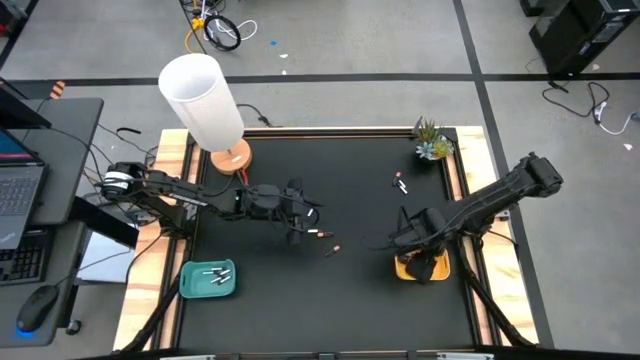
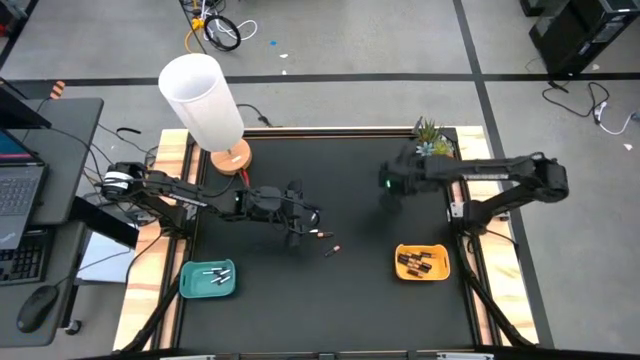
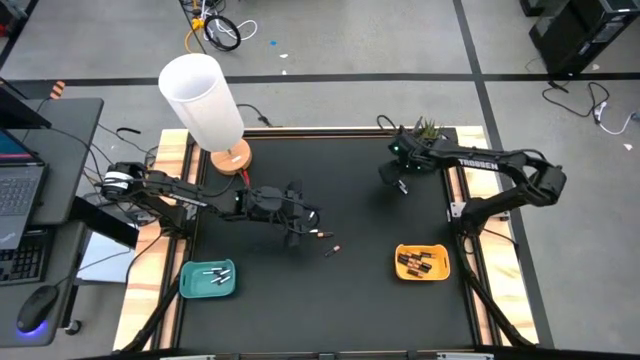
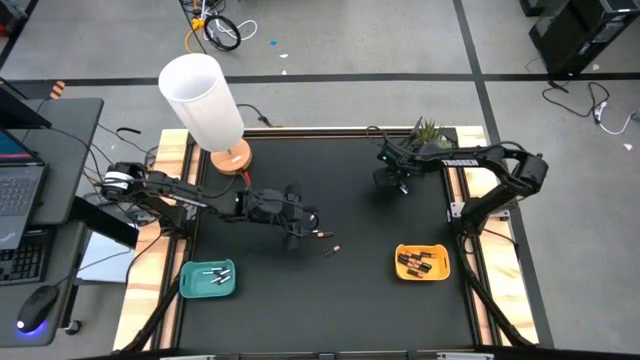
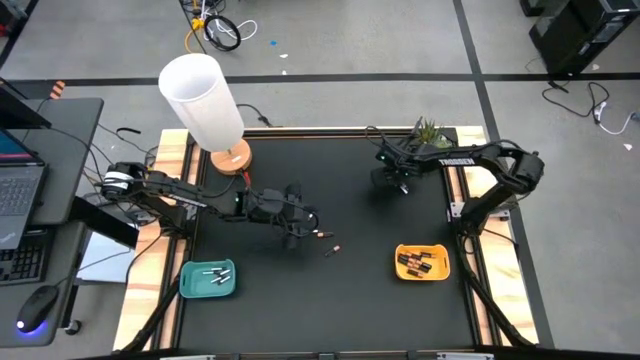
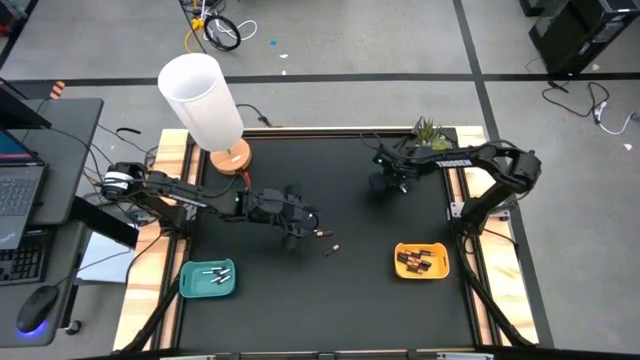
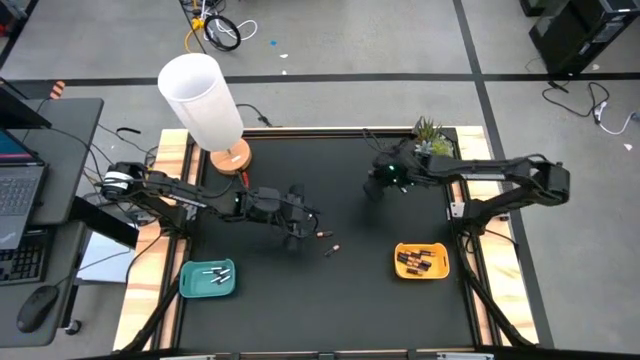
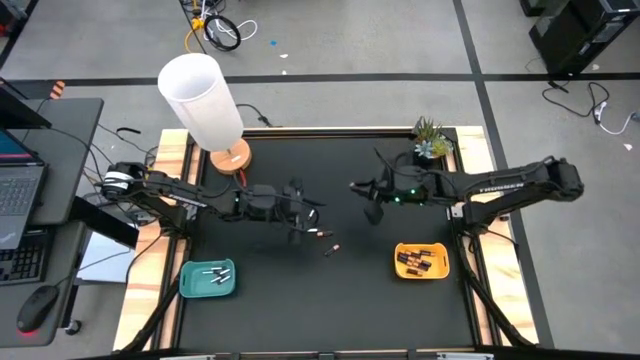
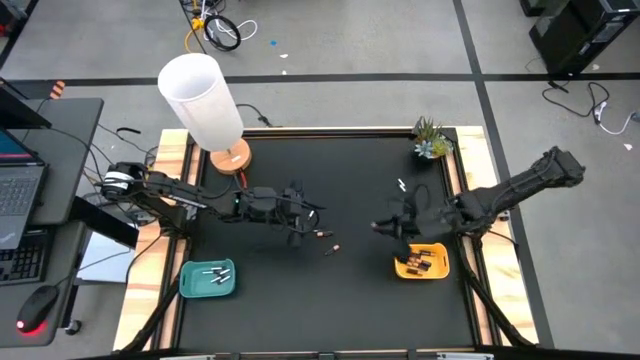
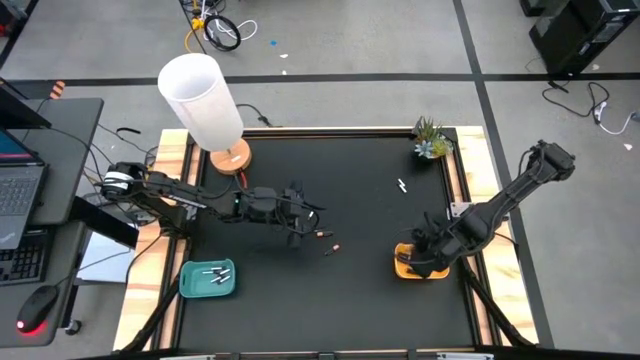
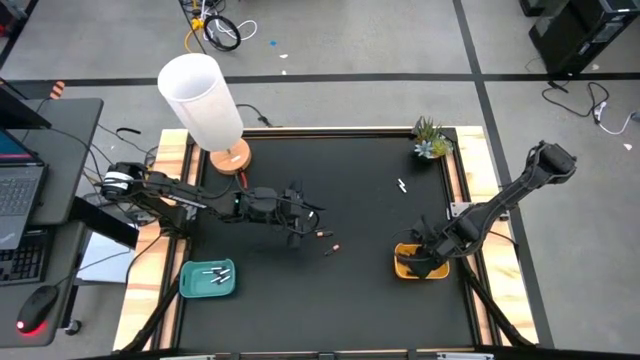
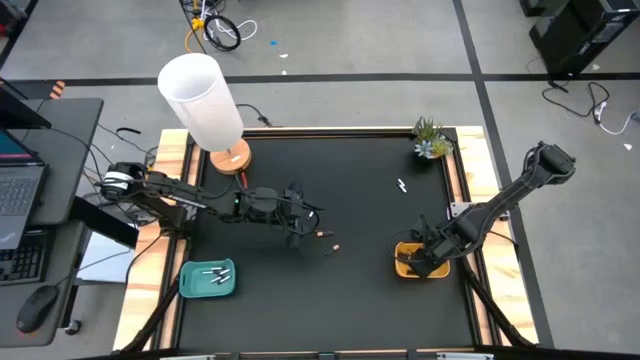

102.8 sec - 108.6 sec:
Task: Sort batteries
Put the black battery into the yellow bin

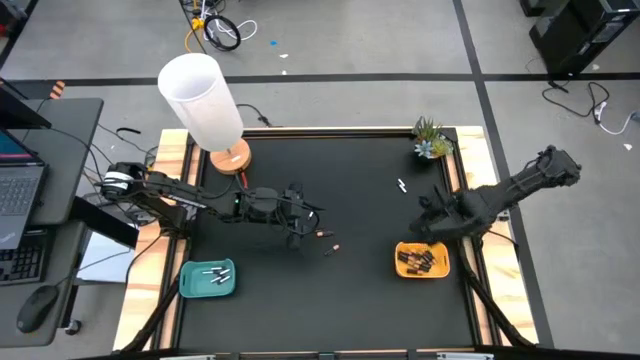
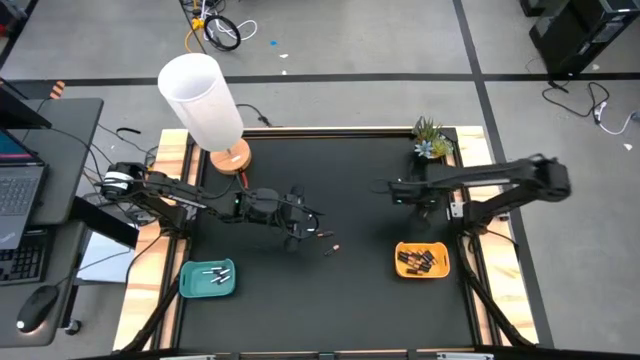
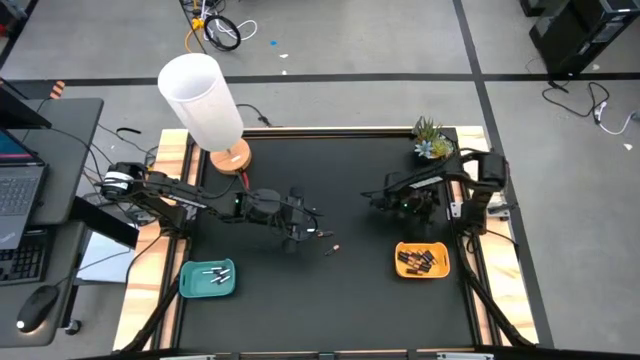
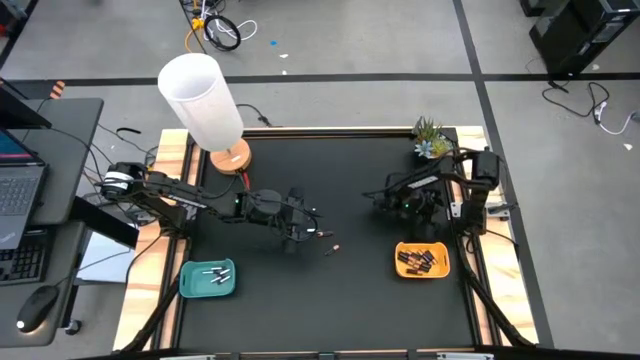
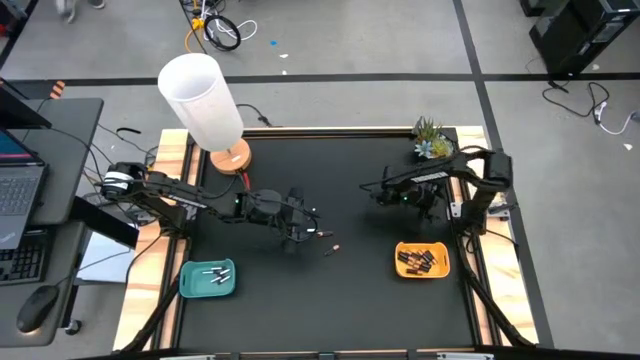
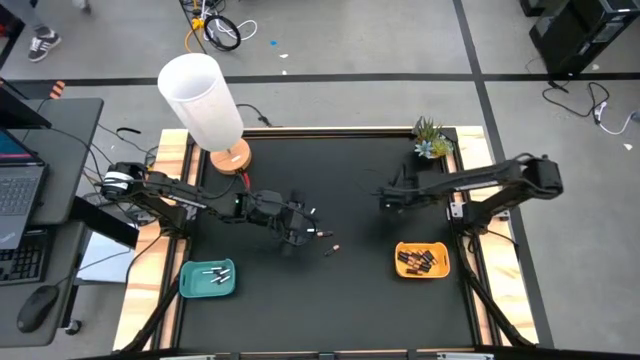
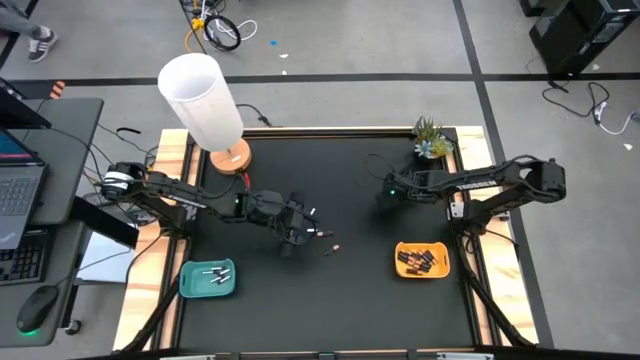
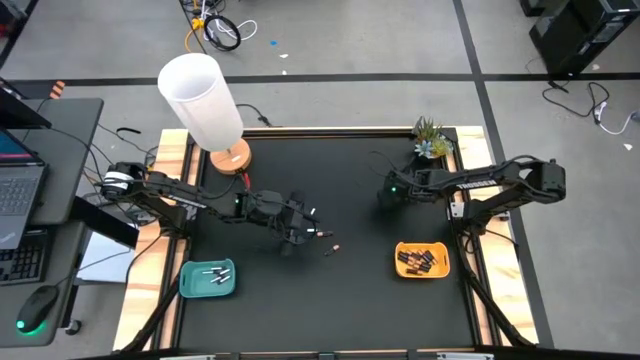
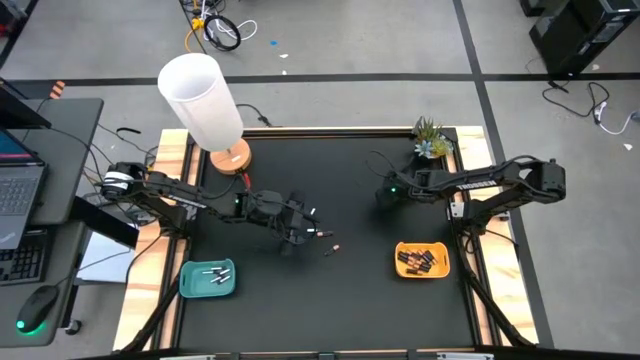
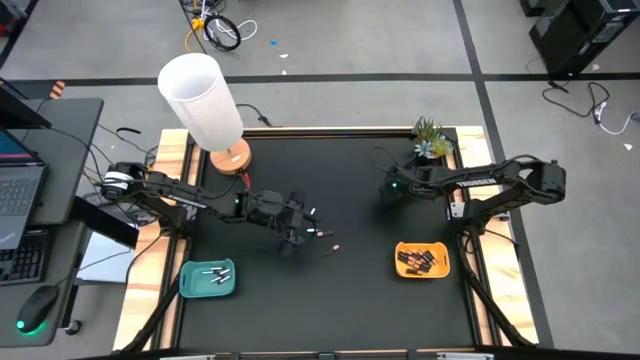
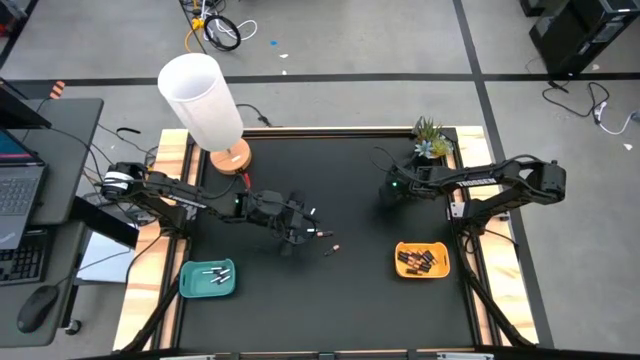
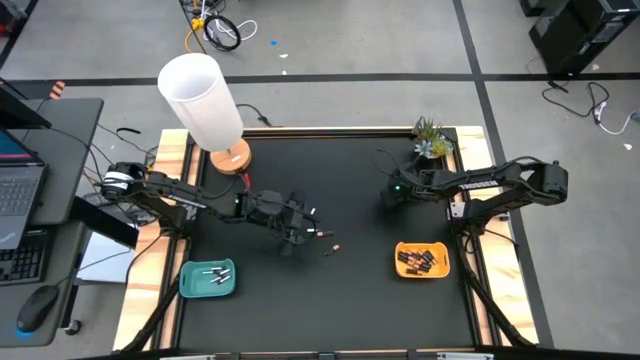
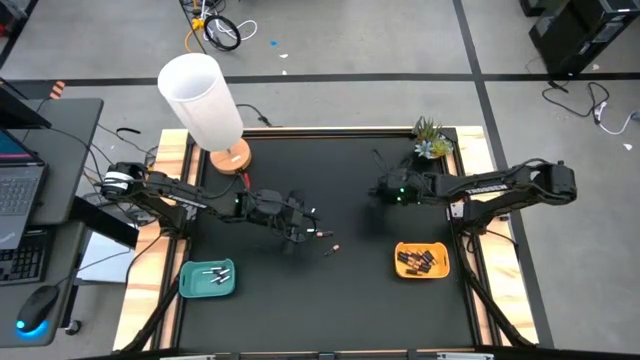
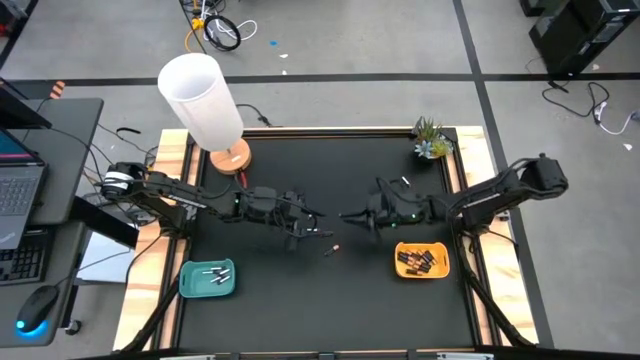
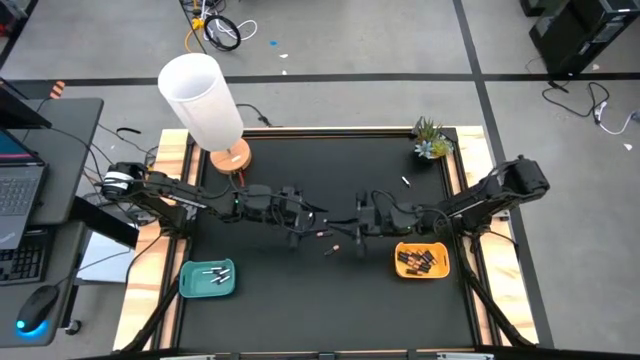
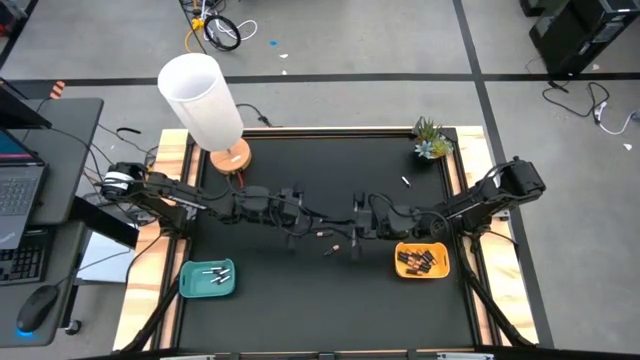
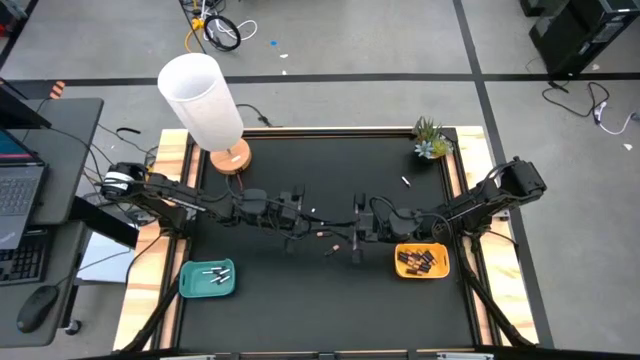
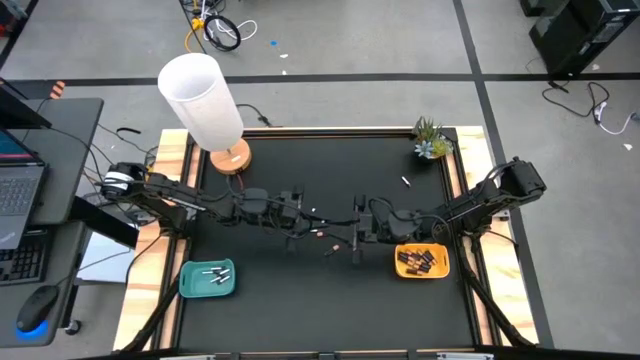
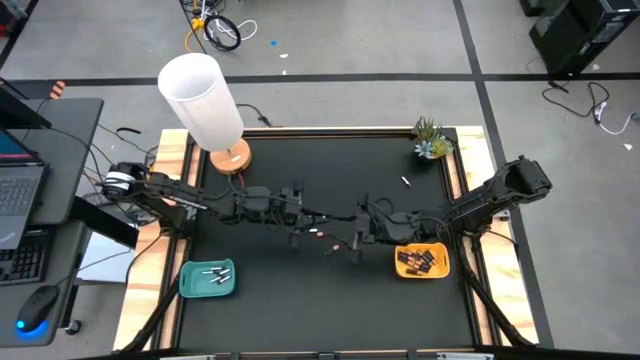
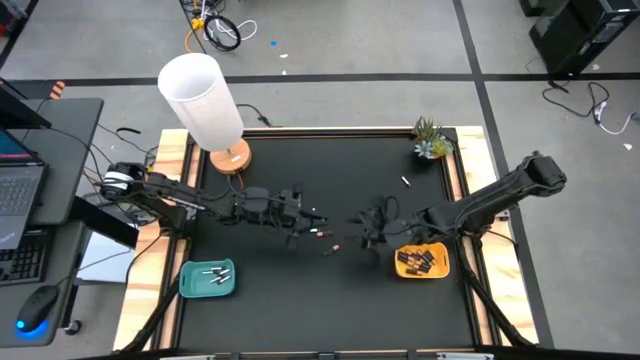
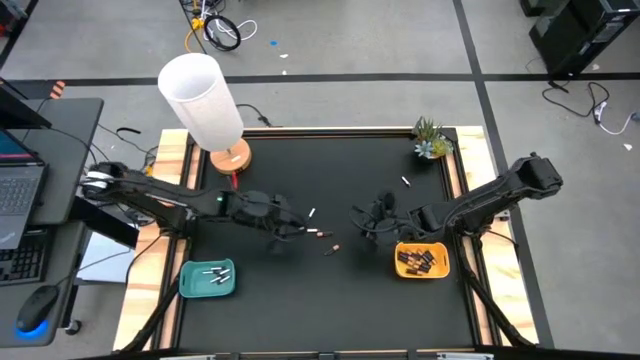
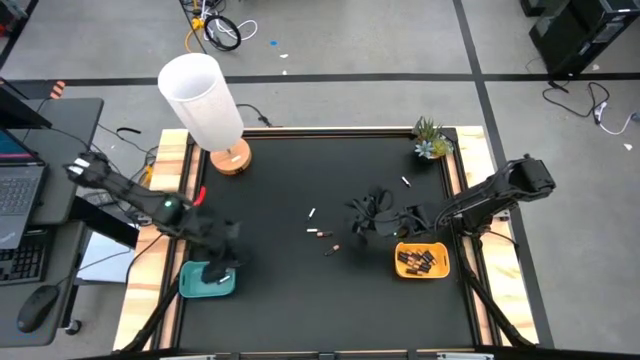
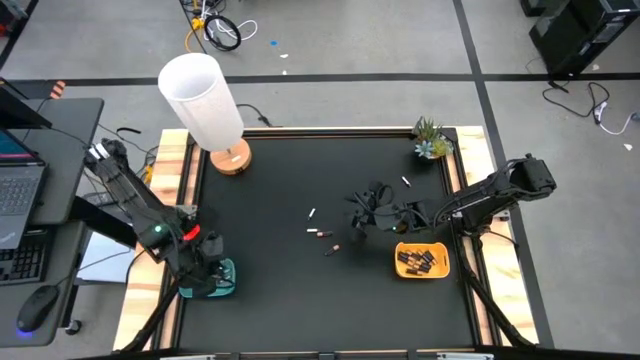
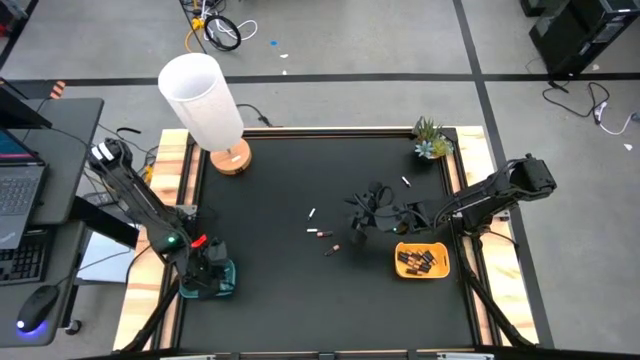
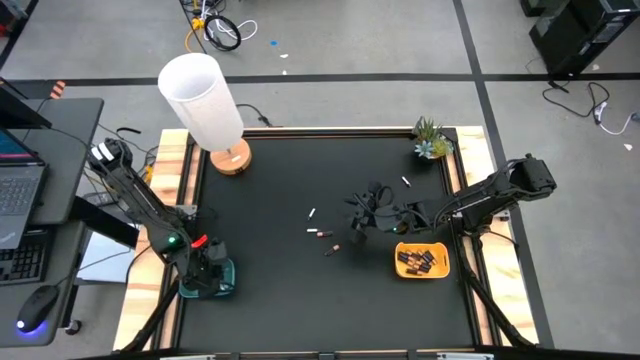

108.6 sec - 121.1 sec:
Put the silver battery into the green bin

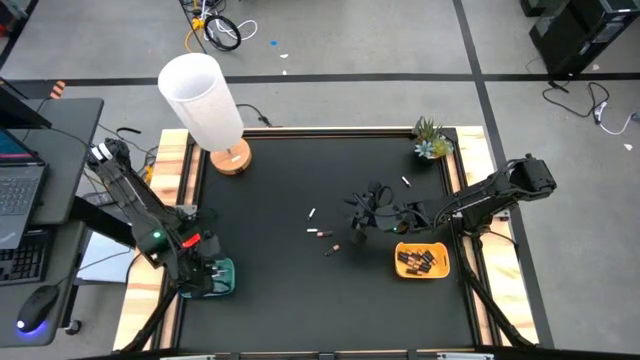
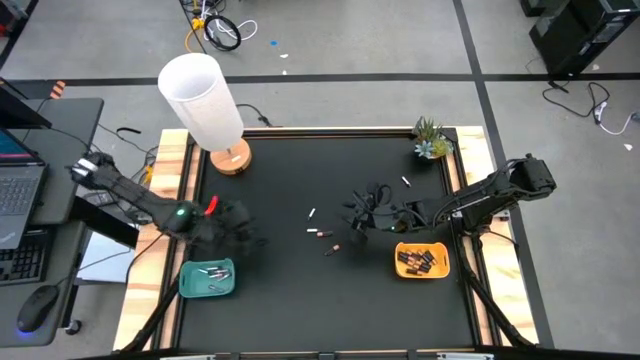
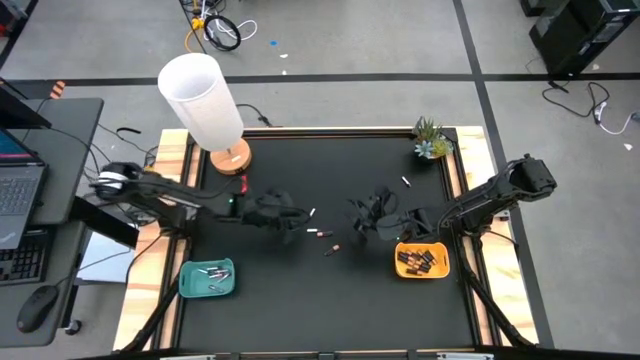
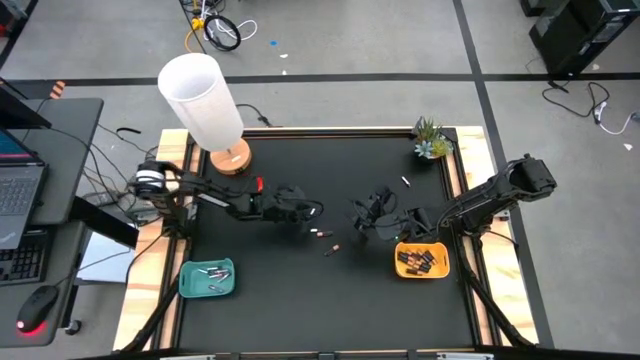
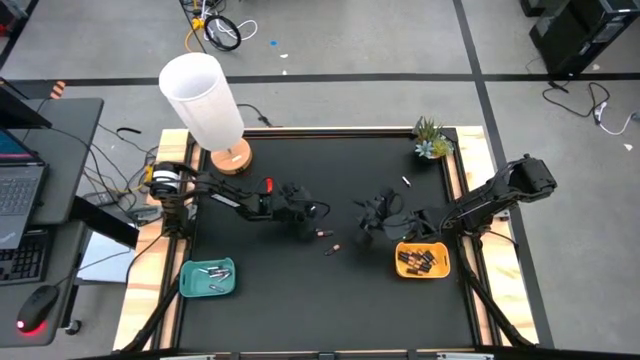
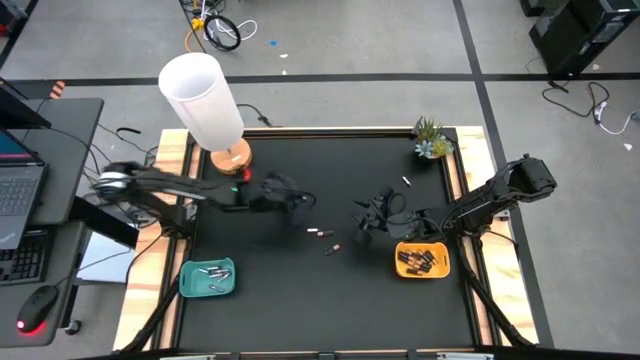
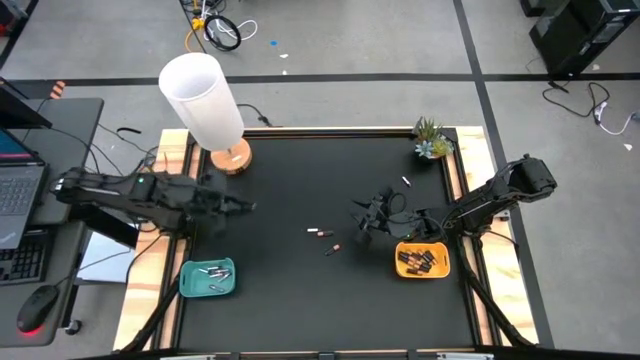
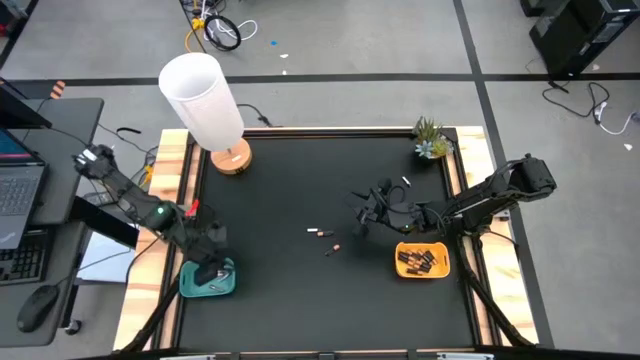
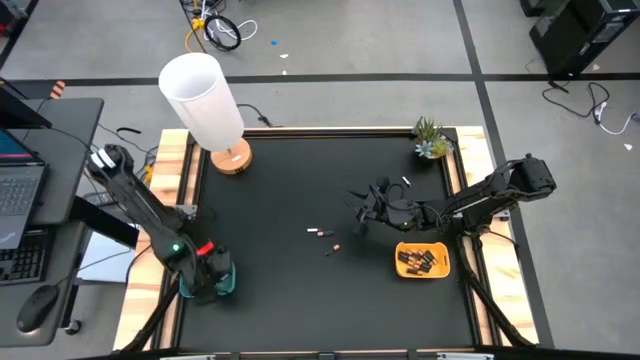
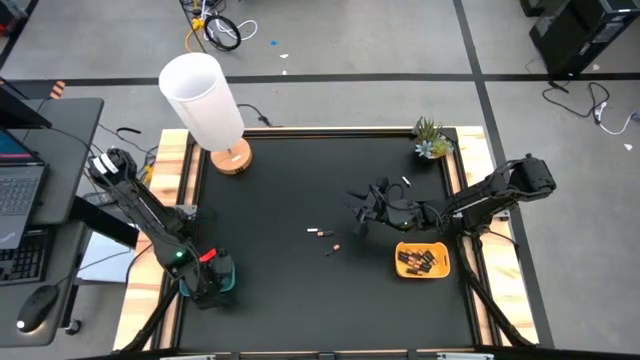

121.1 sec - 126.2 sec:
Put the silver battery into the green bin
